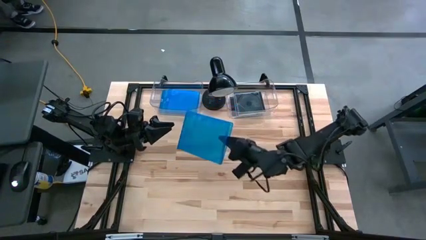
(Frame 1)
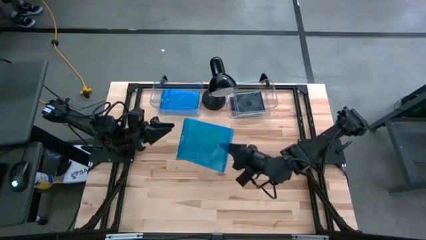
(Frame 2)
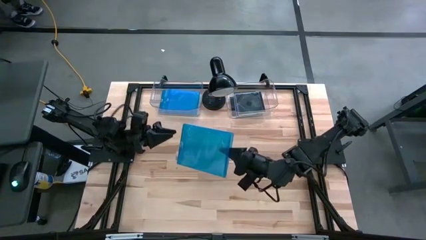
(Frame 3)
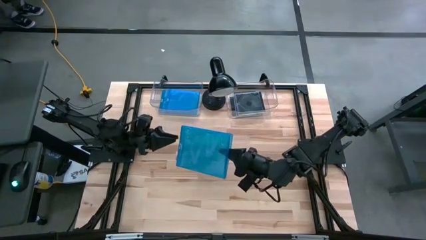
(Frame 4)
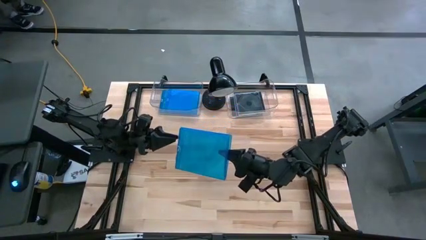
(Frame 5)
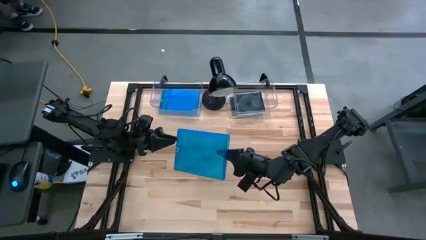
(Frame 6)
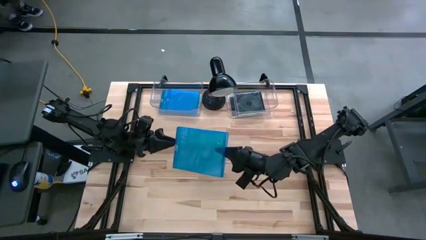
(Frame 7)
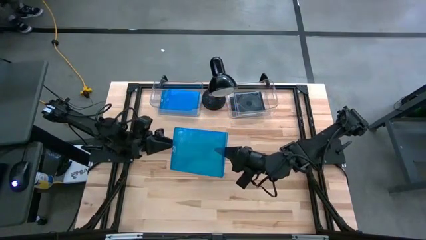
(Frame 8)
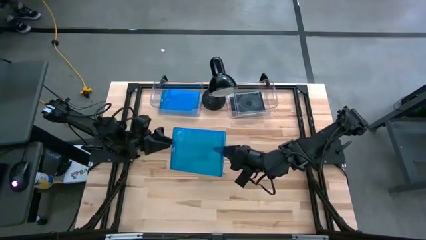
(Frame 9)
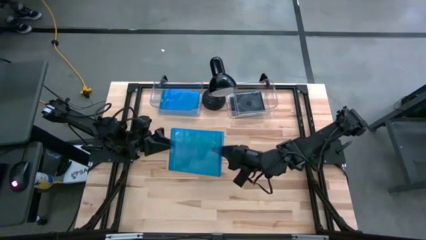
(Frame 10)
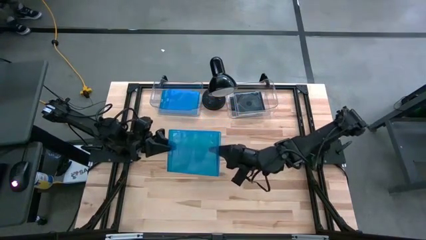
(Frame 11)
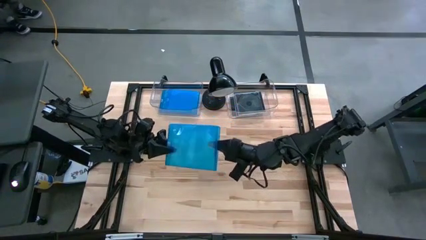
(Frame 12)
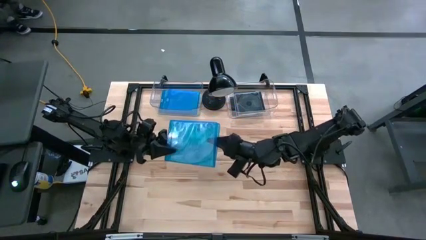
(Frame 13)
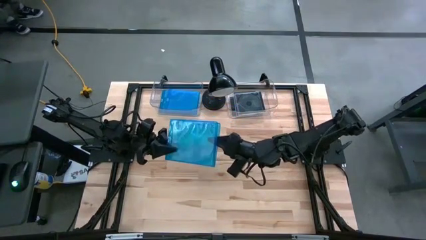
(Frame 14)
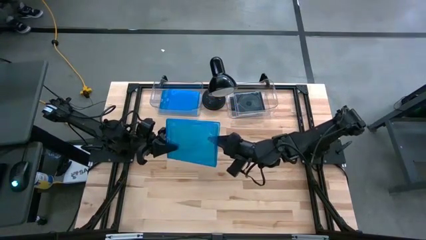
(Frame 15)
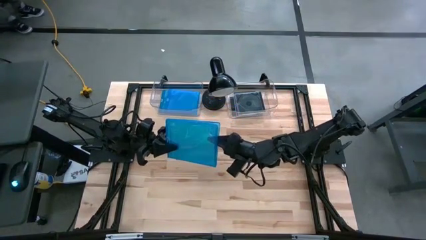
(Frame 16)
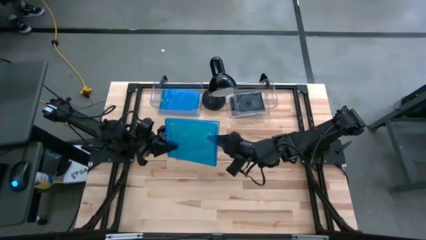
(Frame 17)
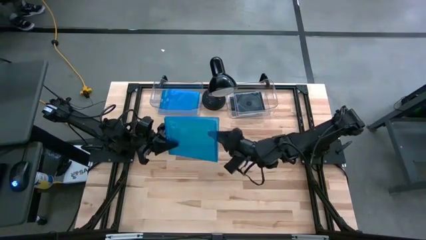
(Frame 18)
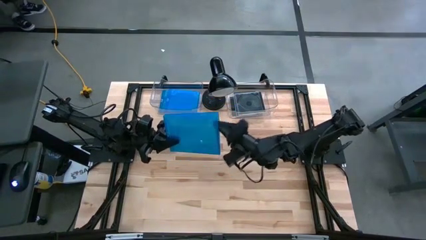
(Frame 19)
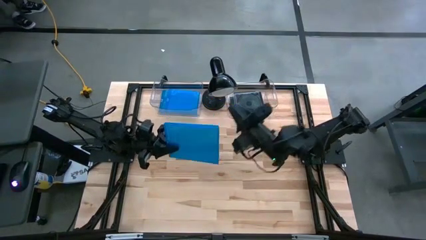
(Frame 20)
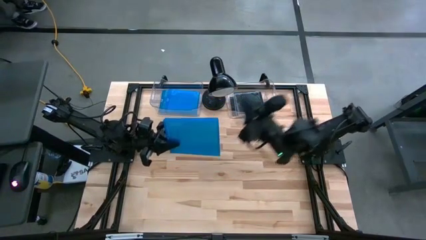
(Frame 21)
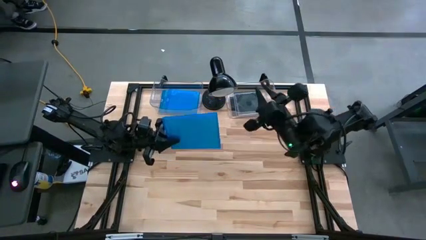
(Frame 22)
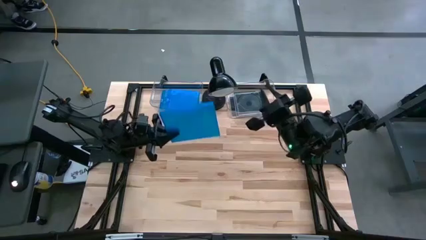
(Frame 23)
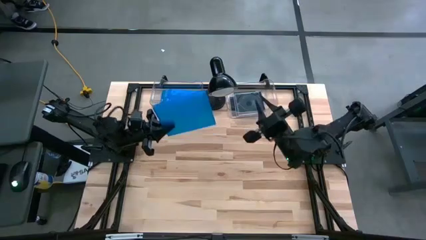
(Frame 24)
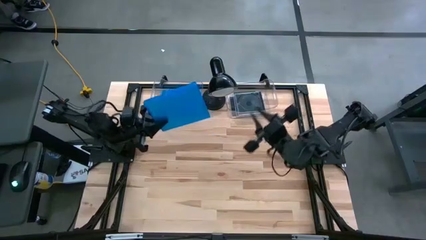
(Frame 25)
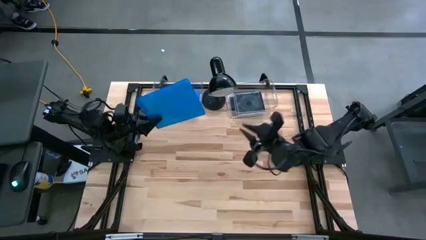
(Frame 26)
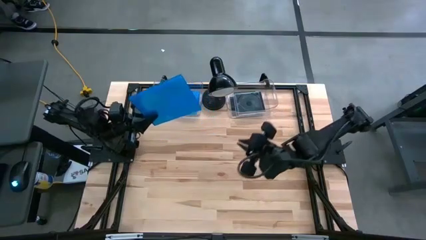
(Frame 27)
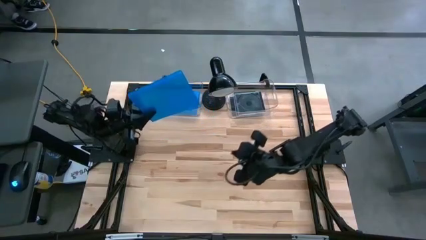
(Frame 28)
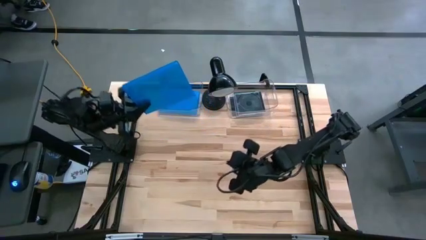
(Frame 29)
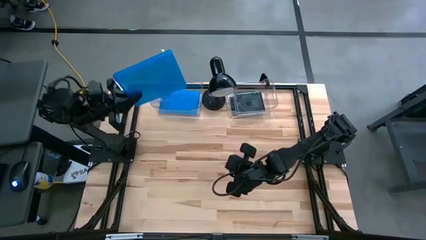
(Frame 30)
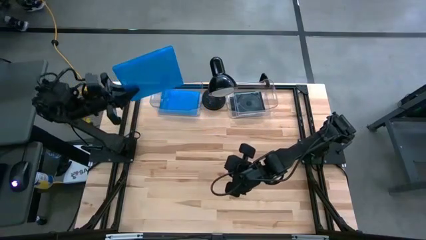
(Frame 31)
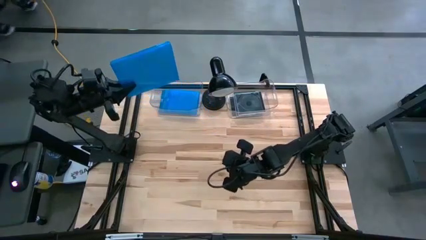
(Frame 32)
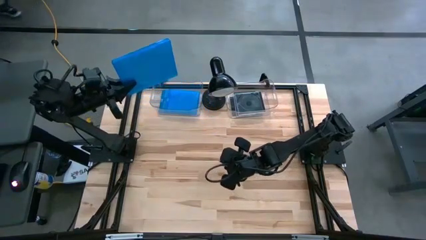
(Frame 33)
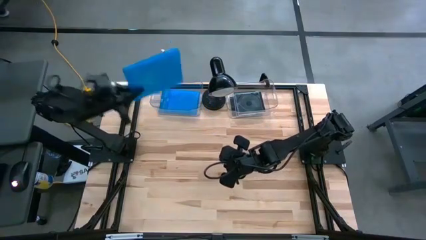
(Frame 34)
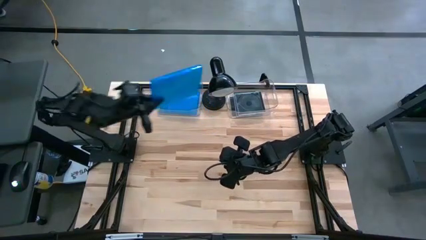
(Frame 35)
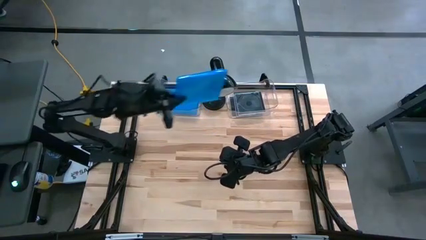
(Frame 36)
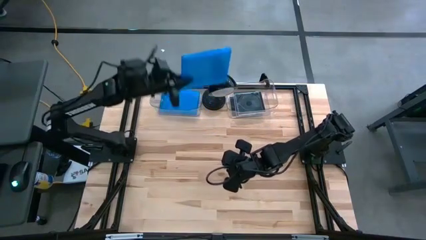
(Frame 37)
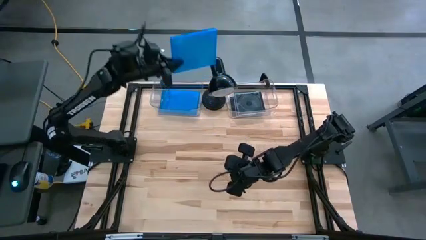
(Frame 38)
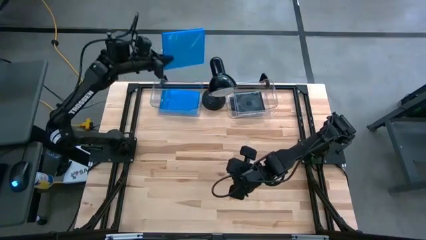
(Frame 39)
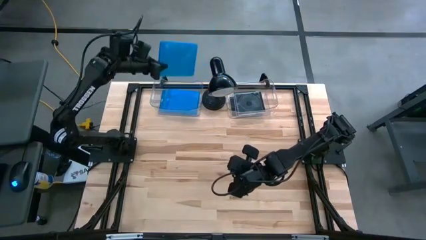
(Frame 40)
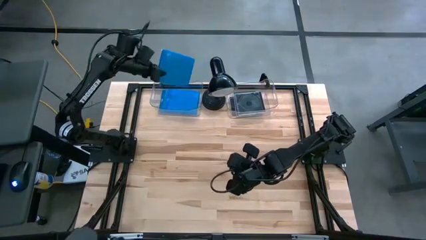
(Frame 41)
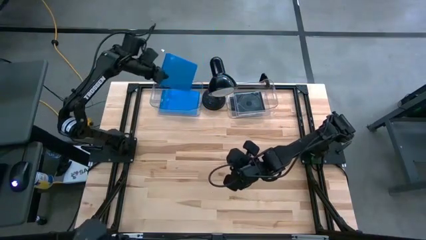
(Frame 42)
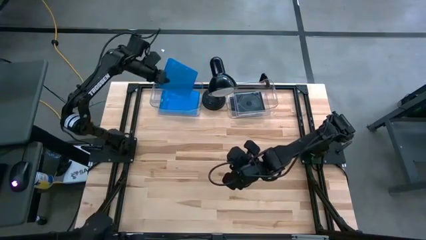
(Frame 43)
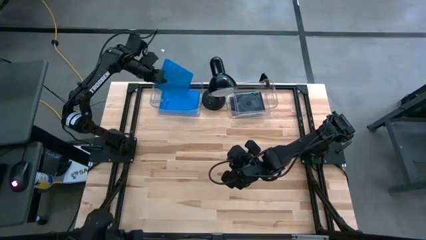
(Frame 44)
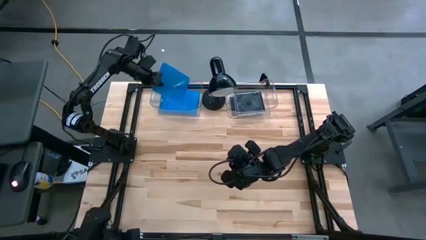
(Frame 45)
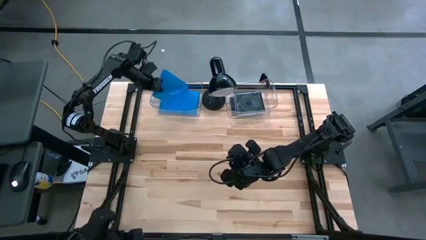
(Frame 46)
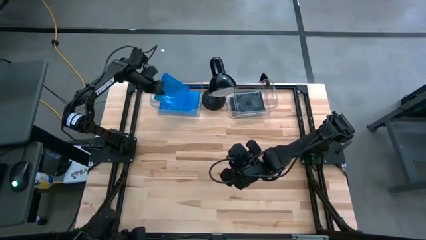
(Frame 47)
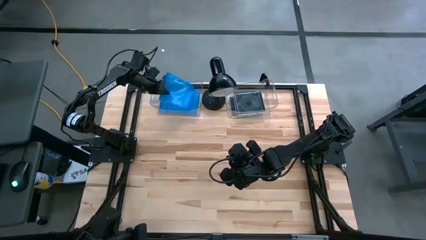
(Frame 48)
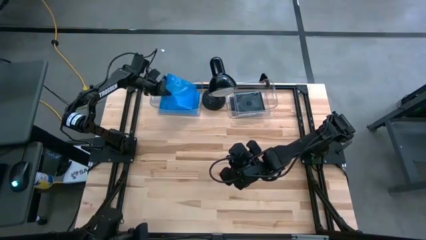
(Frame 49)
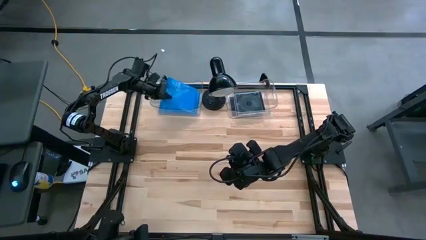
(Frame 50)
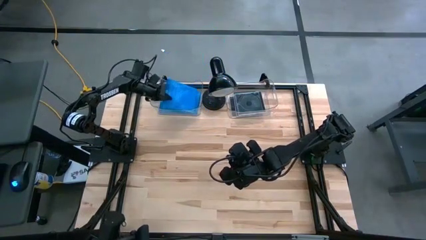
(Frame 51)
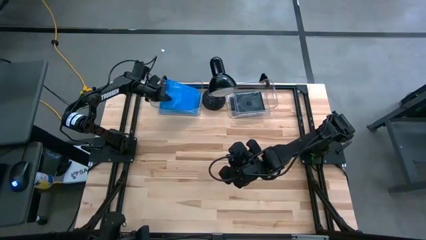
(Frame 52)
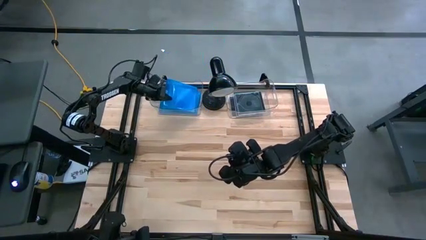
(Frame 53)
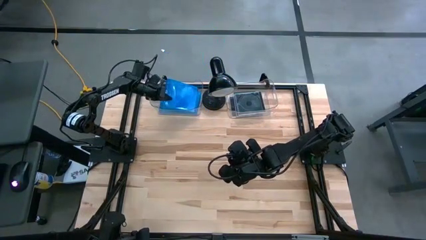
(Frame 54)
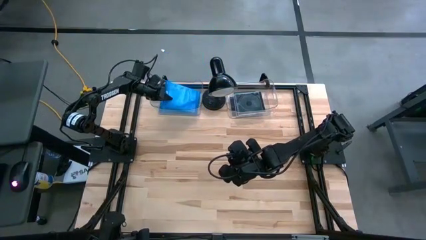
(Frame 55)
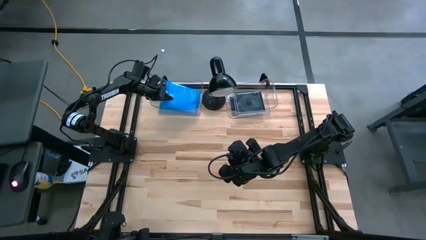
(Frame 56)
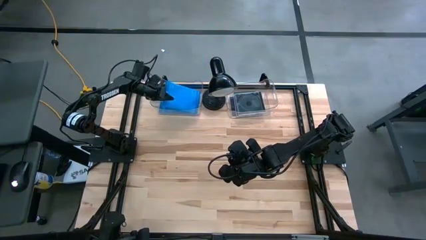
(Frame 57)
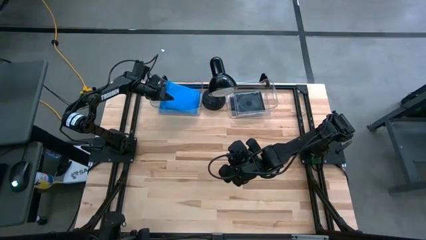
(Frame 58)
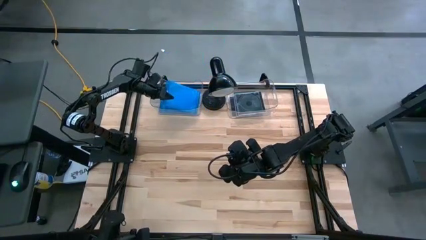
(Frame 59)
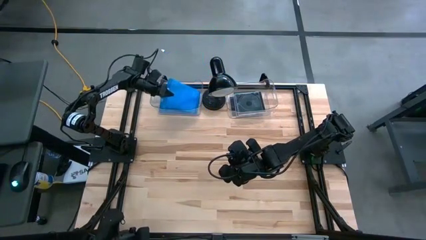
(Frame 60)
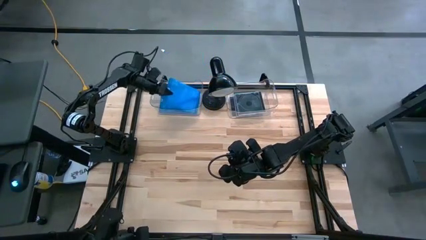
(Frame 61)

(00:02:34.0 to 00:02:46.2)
Task: Pick & place jewel cases by type
Put the blue CD case into the left transparent bin

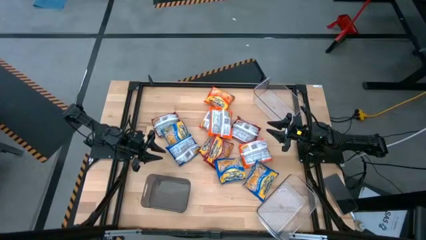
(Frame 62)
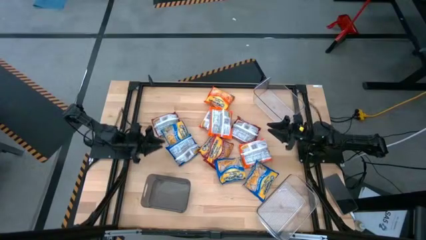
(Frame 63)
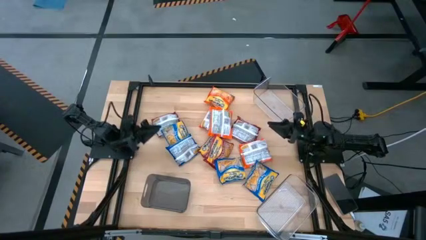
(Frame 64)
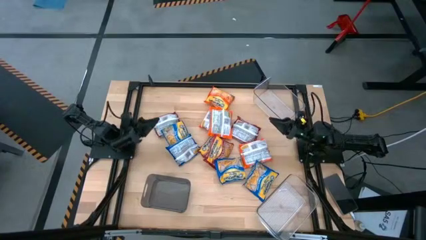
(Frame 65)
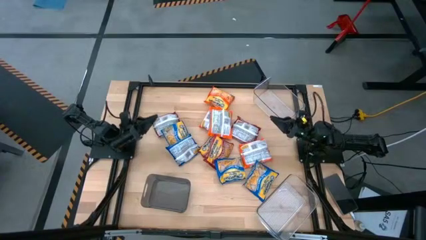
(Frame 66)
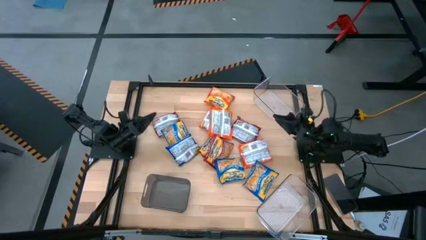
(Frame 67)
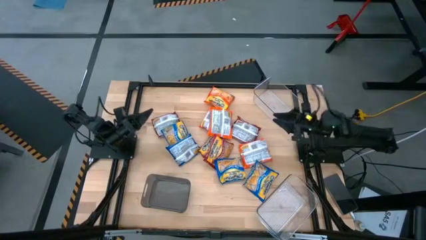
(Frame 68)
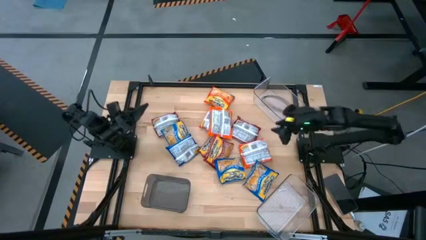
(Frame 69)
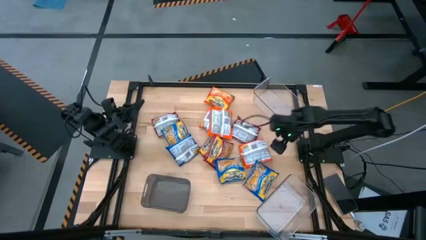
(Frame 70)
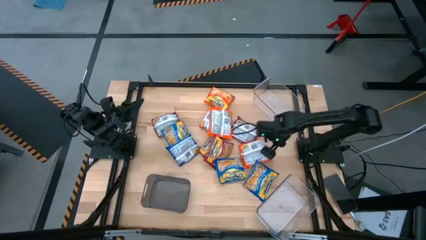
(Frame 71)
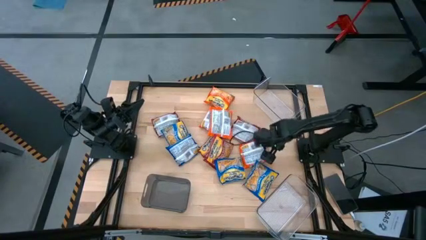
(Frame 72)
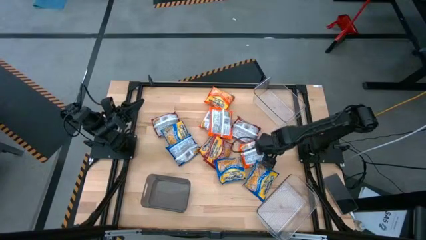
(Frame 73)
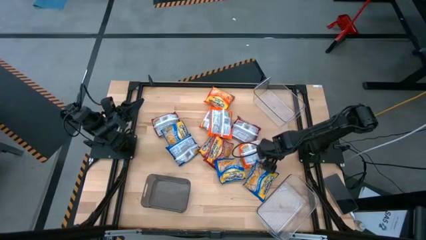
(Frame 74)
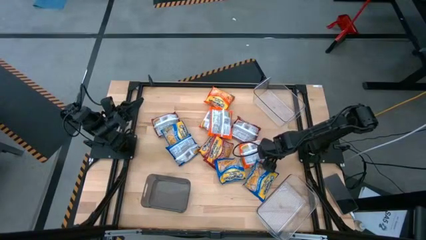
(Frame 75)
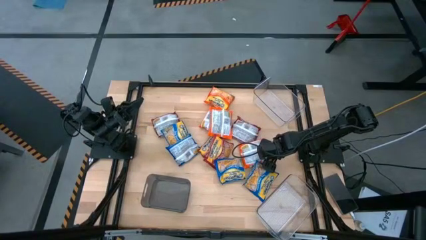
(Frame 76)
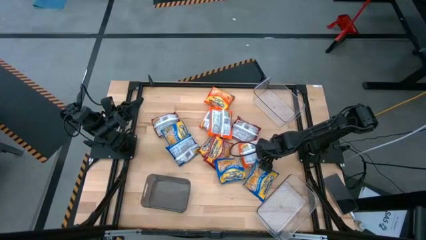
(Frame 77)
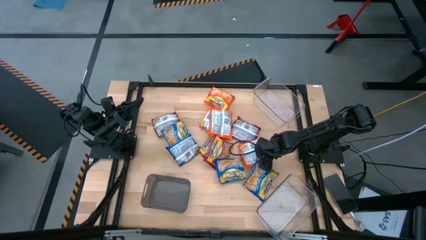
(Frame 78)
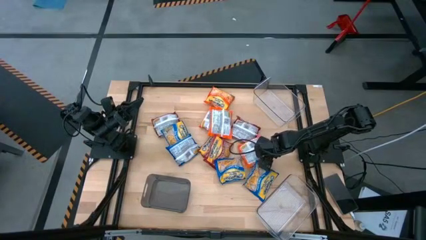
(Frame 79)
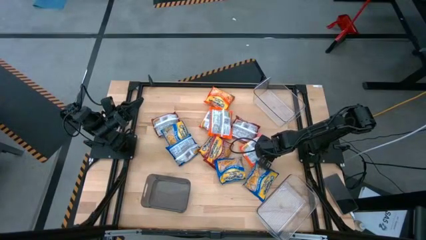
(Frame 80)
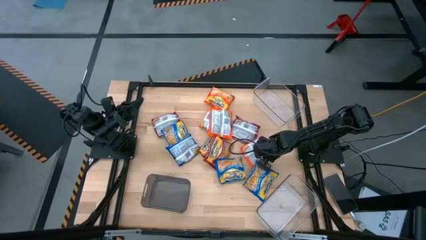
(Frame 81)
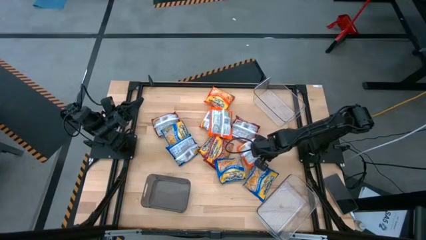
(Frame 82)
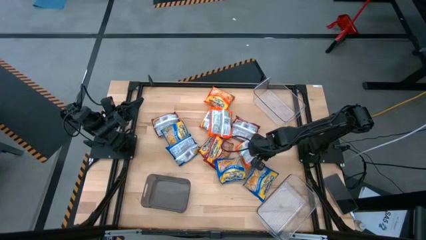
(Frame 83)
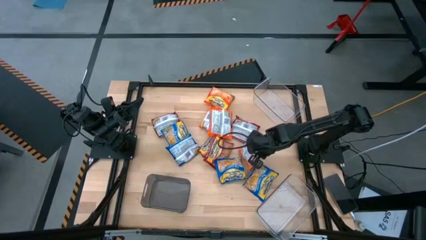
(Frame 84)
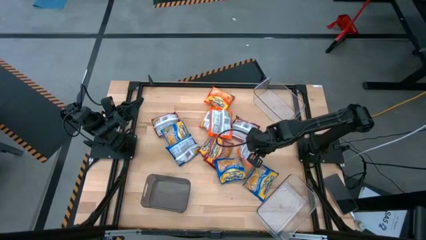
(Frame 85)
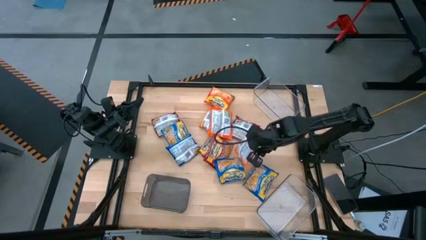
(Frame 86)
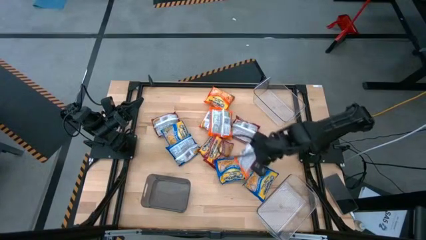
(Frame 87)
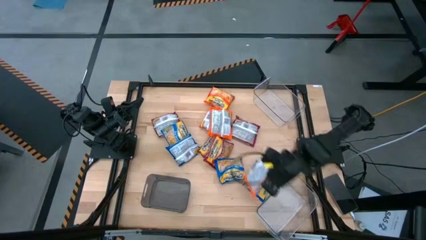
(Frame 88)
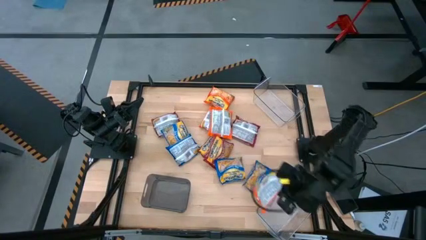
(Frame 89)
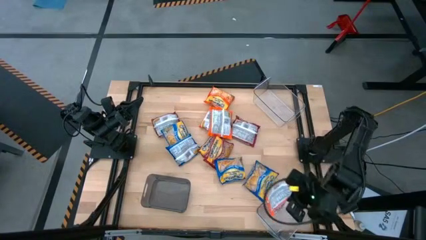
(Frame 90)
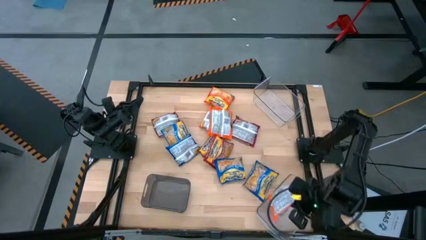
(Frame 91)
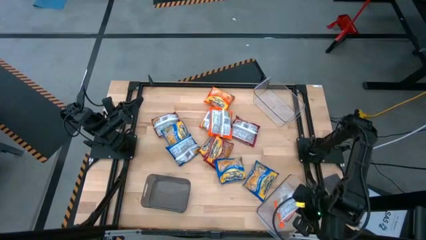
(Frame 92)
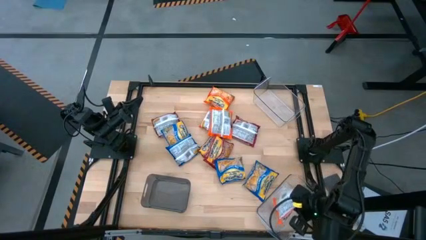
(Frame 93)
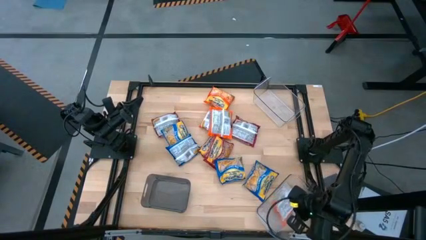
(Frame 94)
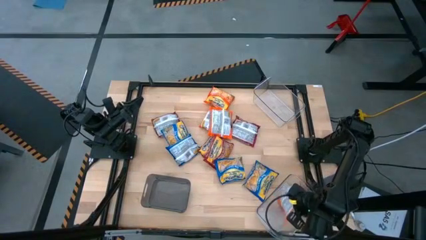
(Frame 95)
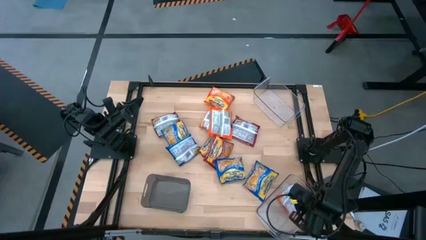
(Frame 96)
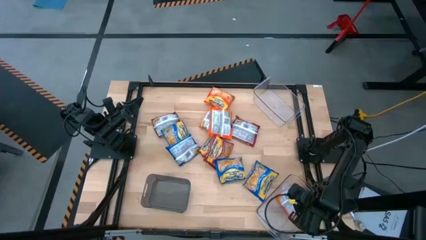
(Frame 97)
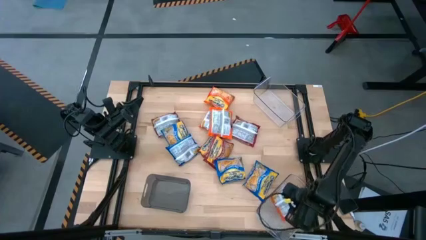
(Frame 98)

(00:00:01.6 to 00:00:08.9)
Task: Sort Maruchan noodles
Put the orange noodle pack into the bottom transparent bin
